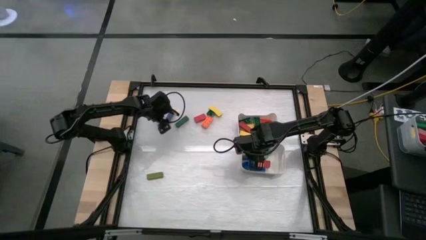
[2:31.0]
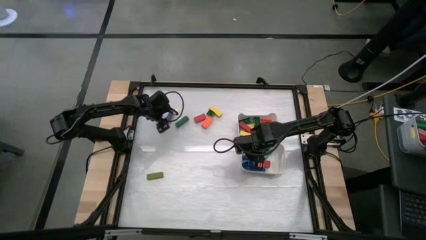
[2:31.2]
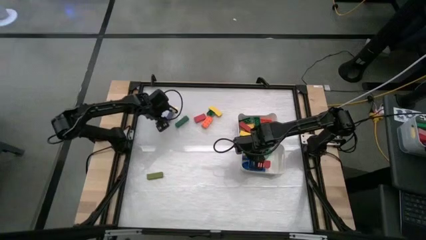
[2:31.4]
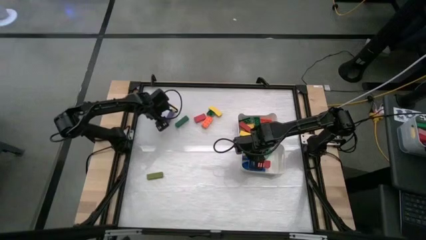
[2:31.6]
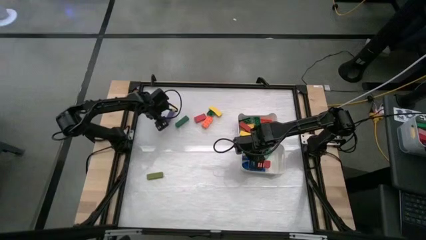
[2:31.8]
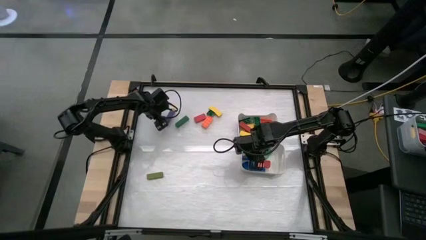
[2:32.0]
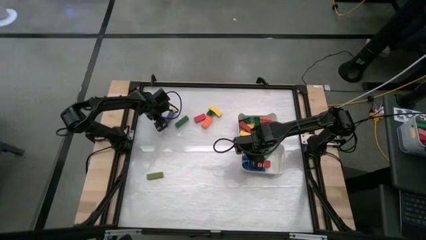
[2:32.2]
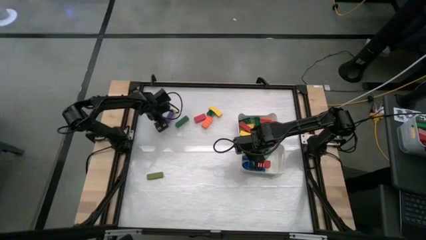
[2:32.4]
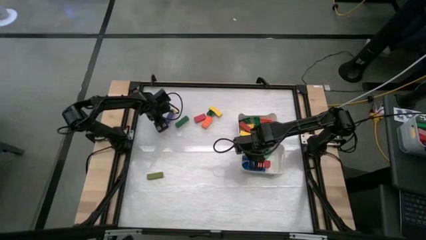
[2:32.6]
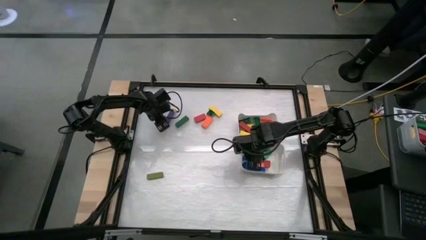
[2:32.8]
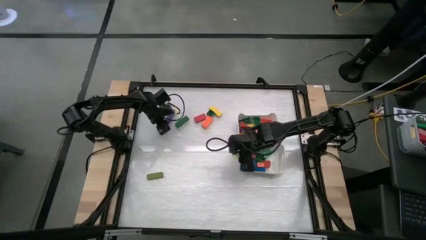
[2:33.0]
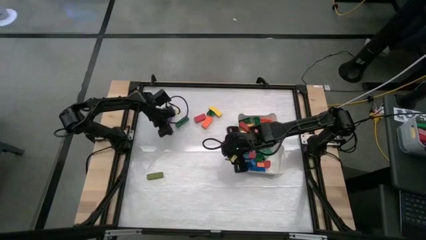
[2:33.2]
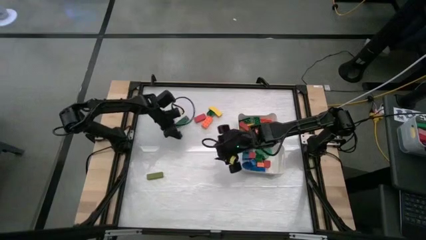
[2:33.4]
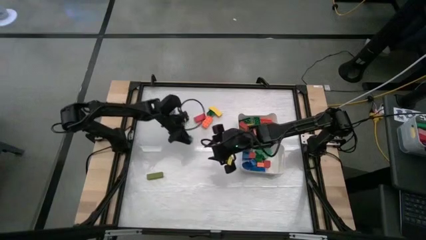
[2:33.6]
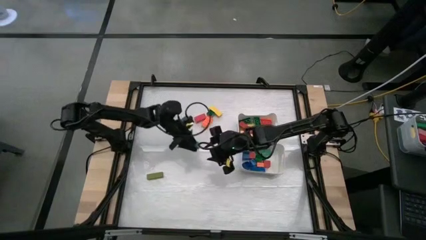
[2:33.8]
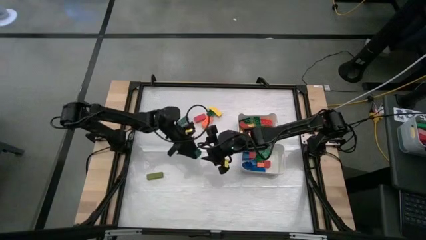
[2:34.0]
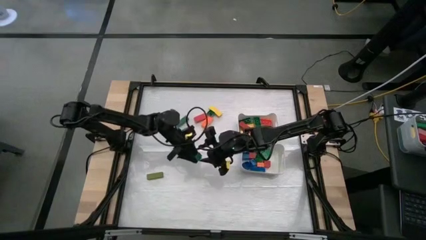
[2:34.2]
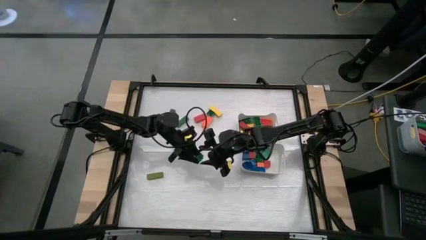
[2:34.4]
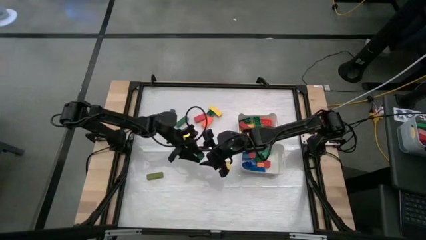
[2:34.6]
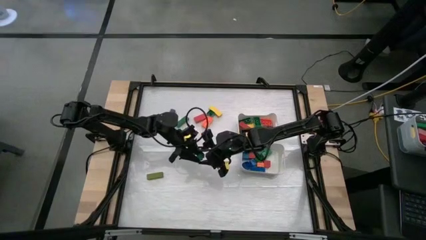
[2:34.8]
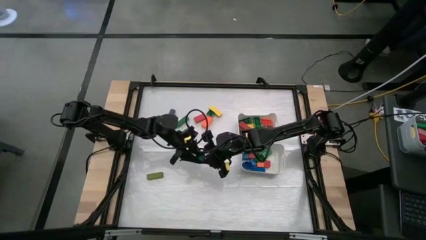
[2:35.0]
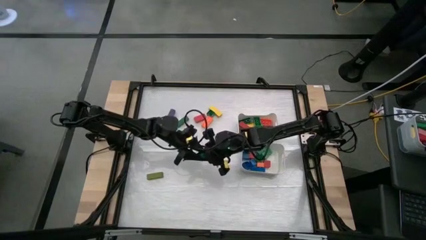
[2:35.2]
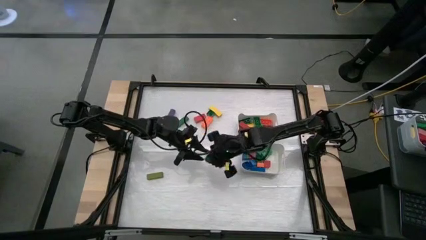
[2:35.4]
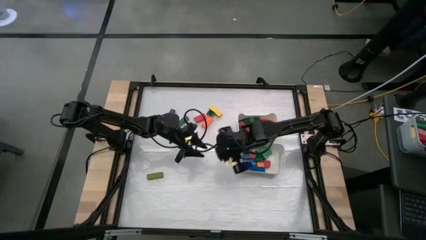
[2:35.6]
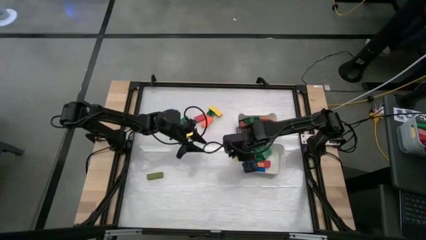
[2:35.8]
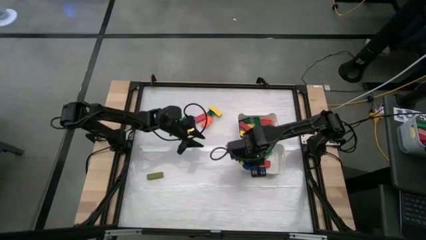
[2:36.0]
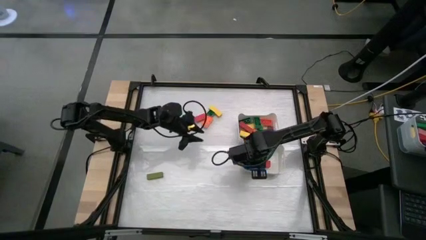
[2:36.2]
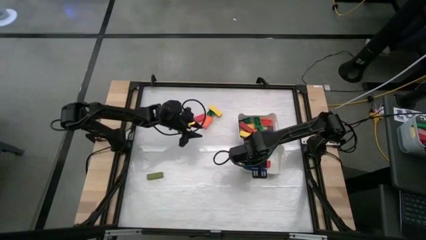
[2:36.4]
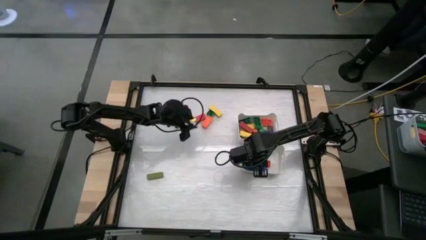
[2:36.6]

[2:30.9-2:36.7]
Task: Sort blocks by size
Put the green cube game piece into the bottom white bin

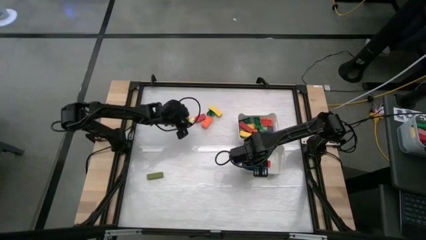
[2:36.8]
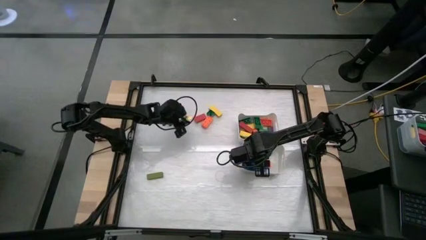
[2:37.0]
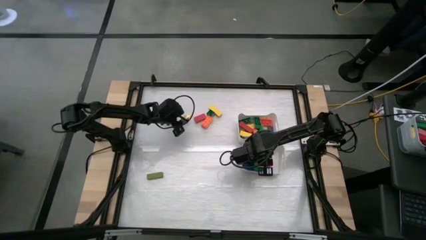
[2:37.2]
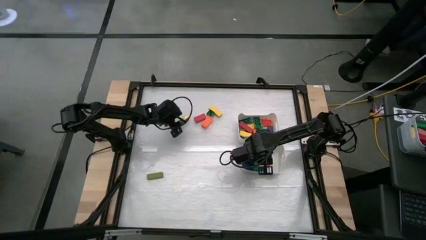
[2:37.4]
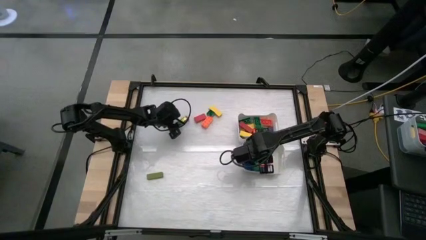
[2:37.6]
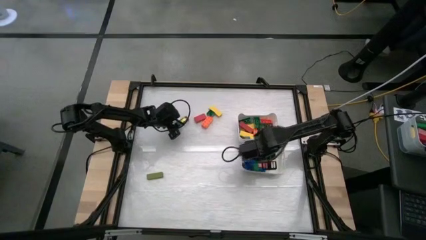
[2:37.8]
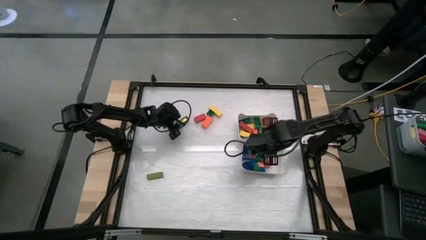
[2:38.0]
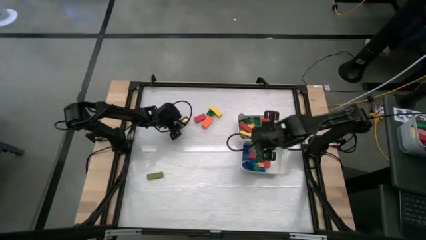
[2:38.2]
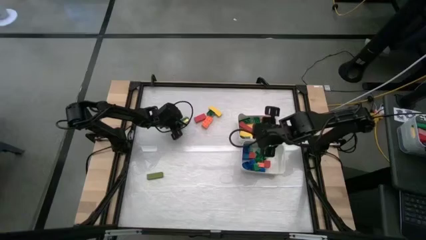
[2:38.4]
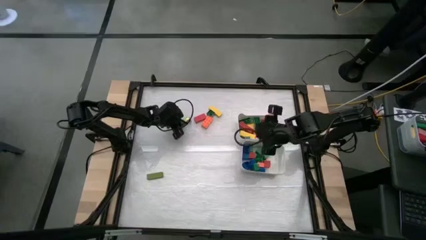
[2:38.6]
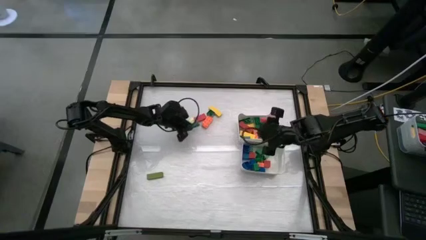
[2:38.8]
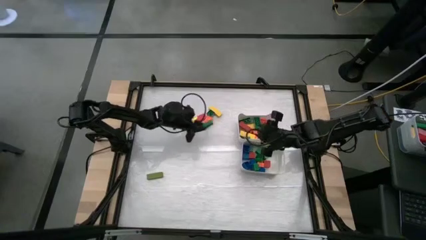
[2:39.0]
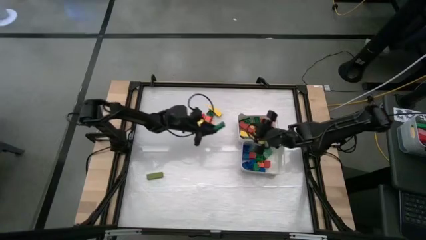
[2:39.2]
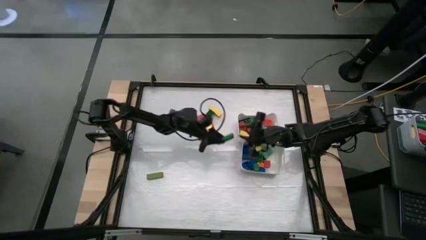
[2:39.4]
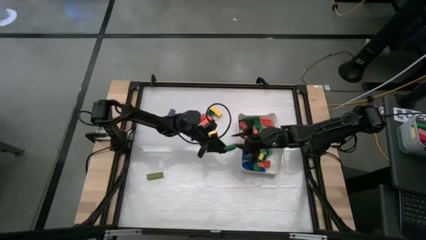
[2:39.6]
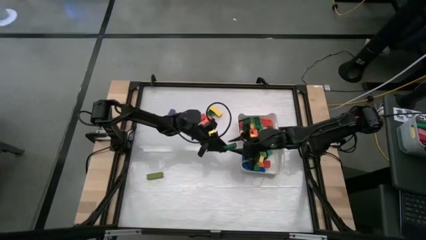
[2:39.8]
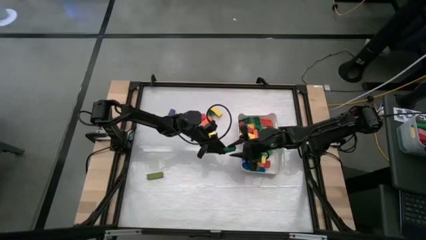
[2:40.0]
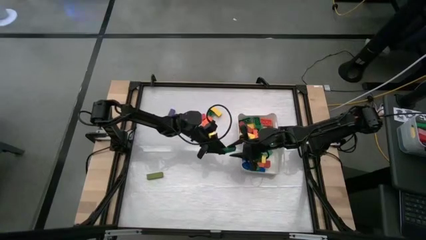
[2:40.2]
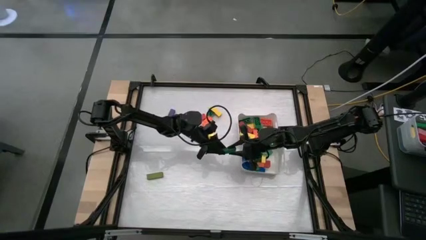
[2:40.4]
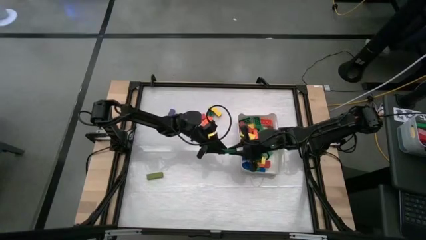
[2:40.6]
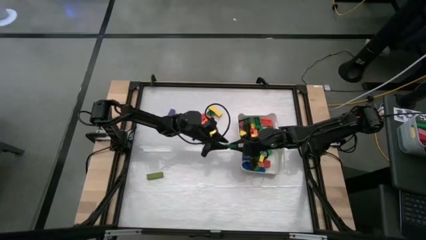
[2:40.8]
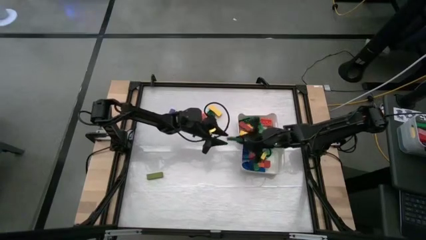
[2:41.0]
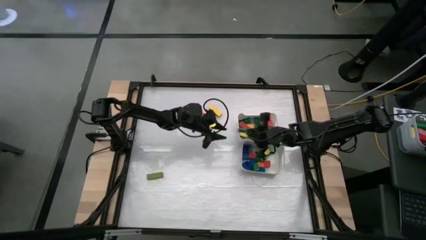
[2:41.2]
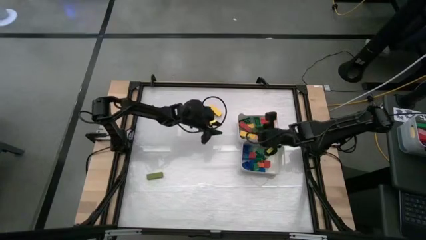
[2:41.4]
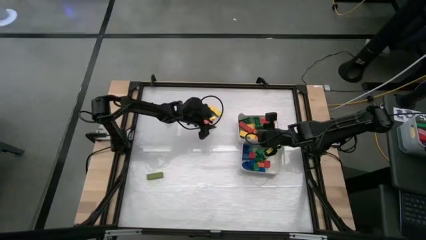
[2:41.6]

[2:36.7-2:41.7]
Put the green thin rectangle block into the top white bin

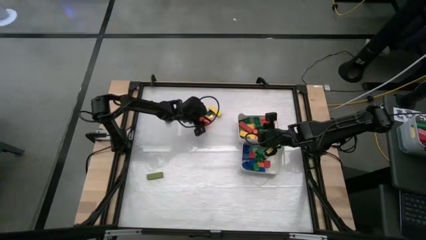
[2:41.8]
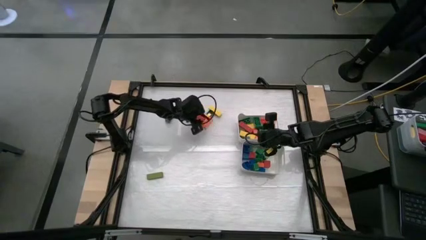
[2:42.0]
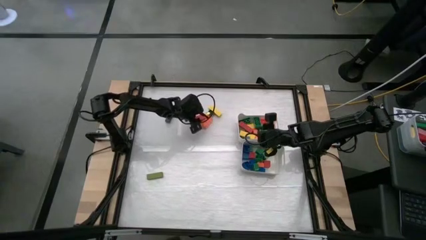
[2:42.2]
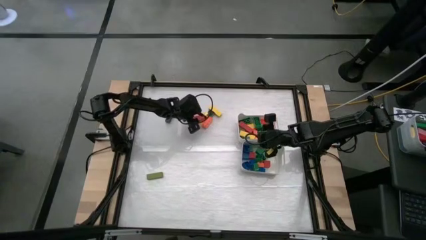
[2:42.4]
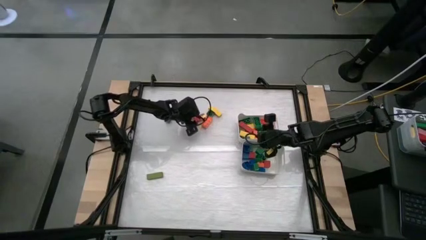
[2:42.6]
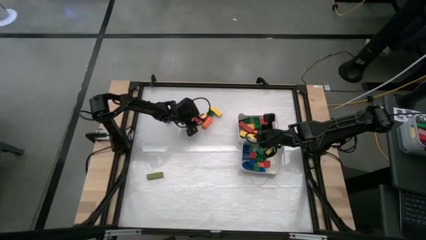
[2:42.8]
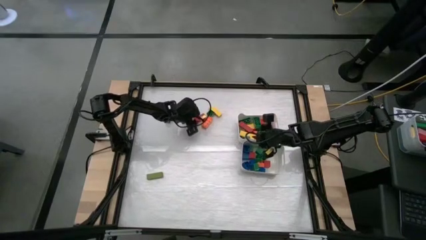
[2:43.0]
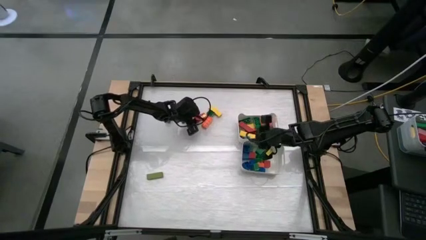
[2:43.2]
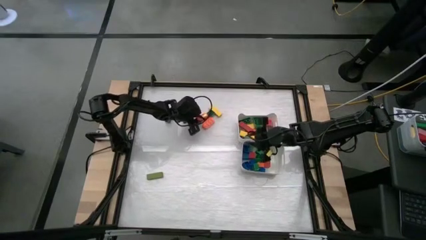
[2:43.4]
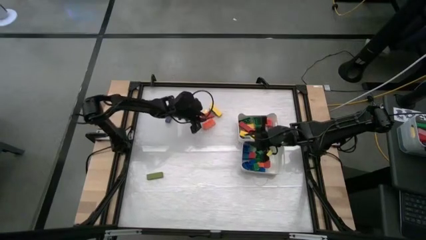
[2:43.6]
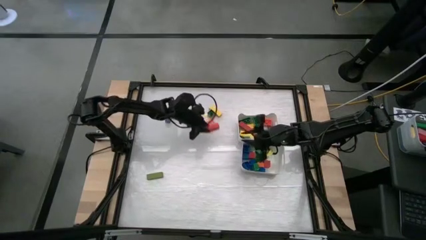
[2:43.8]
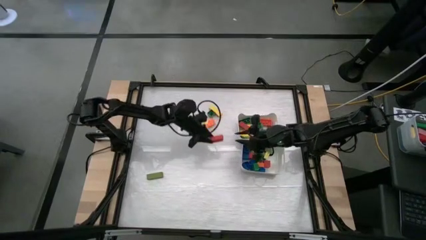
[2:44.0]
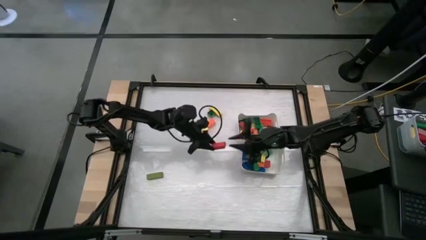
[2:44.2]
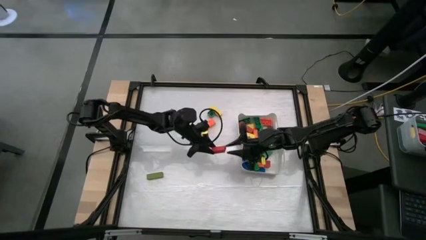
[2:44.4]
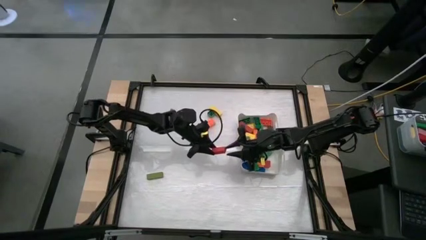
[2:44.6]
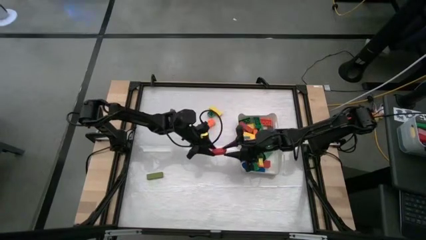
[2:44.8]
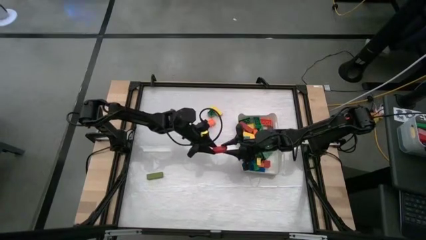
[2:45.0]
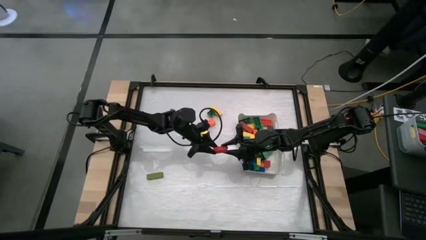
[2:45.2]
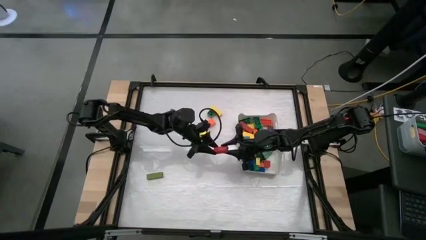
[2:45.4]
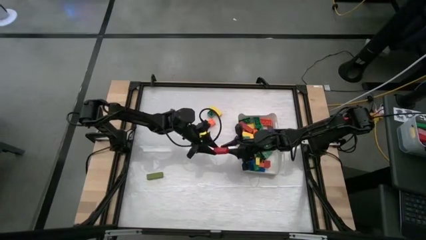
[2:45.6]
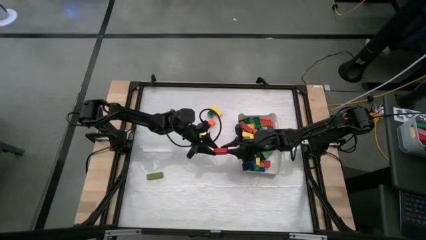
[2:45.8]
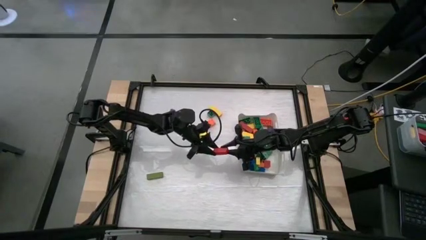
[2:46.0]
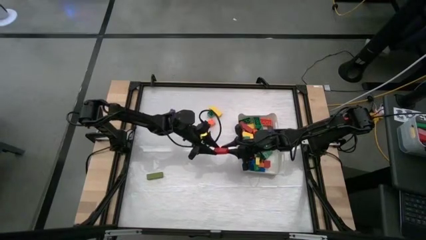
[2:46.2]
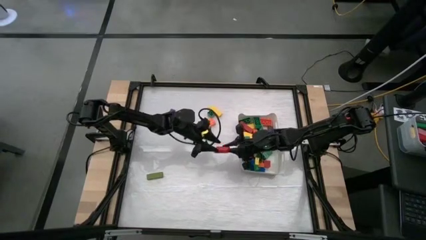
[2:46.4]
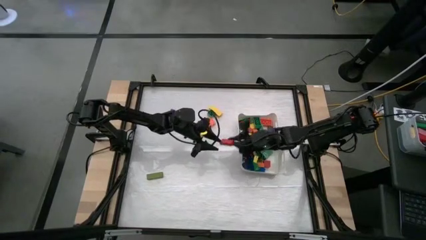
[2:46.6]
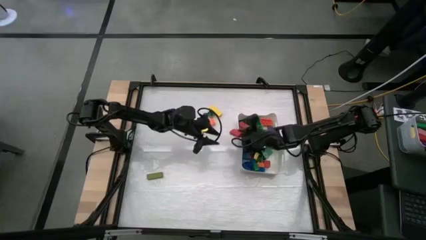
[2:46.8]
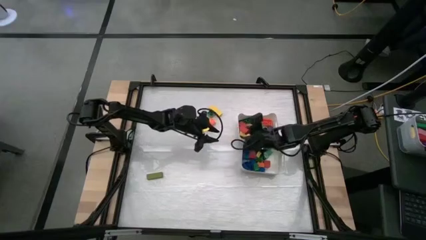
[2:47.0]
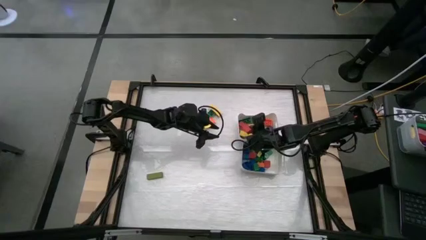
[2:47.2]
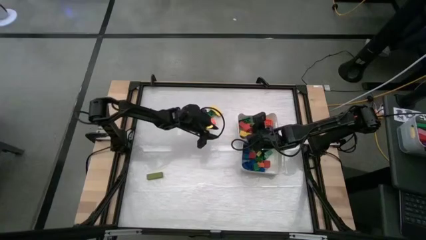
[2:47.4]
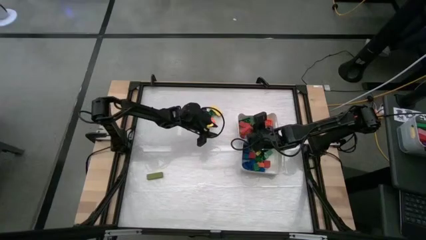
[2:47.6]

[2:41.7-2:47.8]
Put the red thick rectangle block into the top white bin

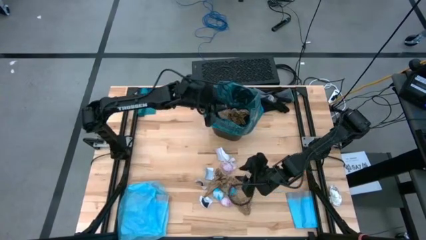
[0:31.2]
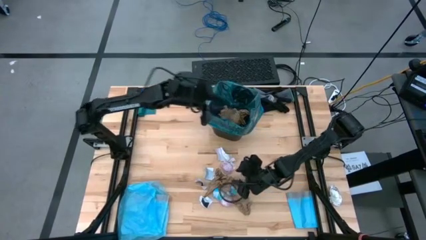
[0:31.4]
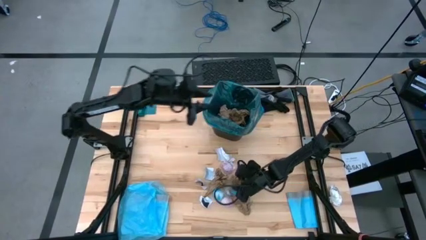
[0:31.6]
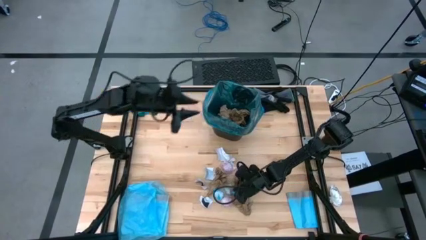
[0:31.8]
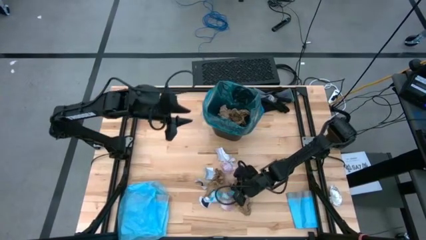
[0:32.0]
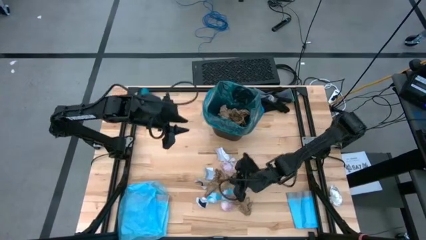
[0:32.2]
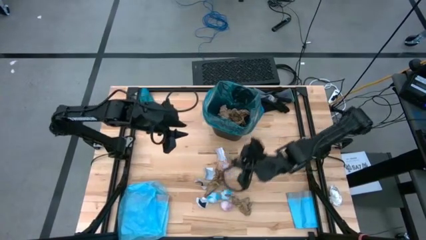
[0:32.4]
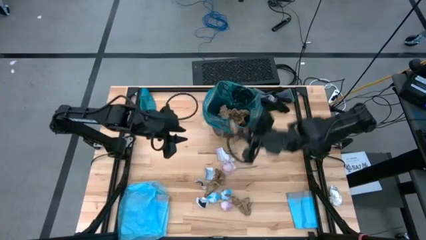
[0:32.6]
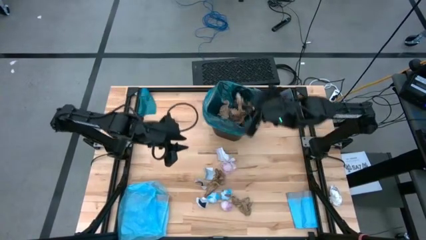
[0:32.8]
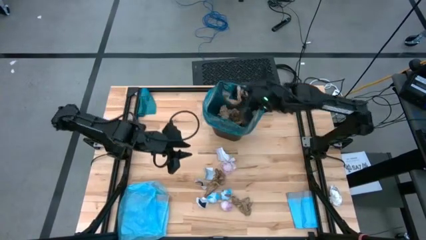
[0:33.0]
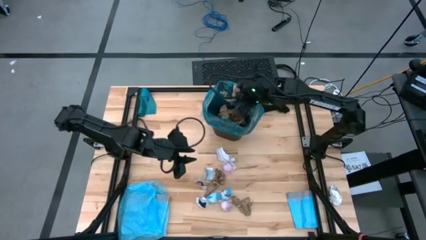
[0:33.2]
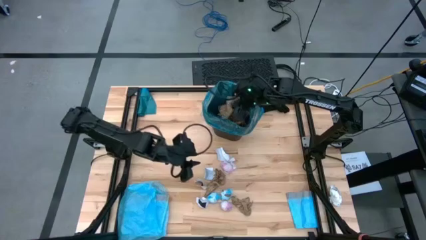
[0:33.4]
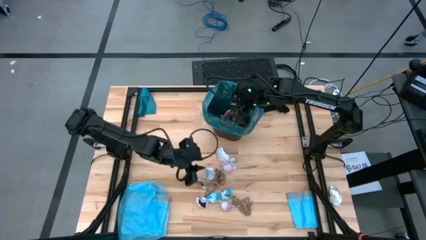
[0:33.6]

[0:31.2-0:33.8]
Task: place trash/remove bag and relplace
Put the brown napkin into the blue trash bag inside the black trash bin
